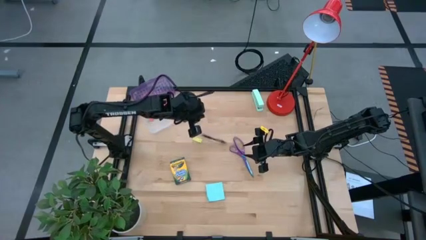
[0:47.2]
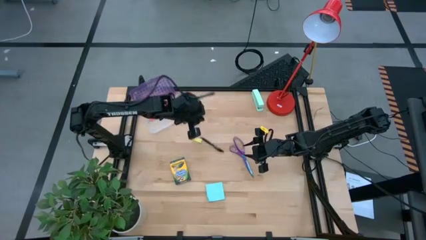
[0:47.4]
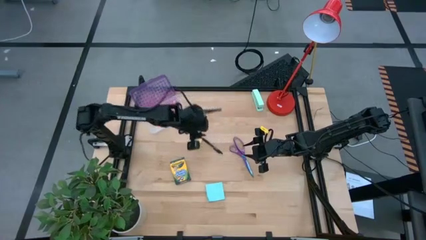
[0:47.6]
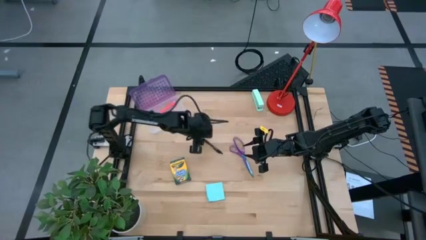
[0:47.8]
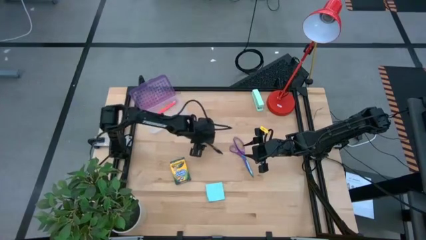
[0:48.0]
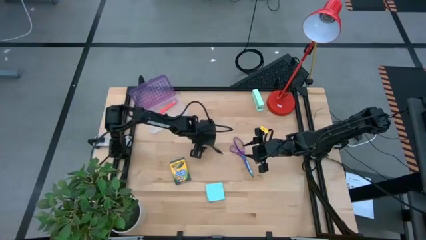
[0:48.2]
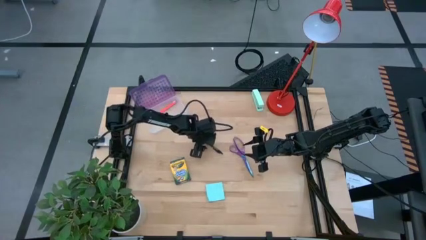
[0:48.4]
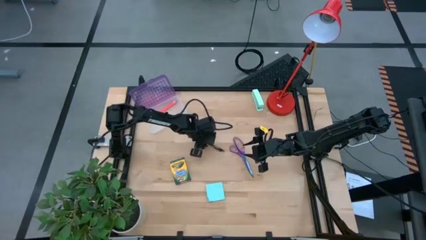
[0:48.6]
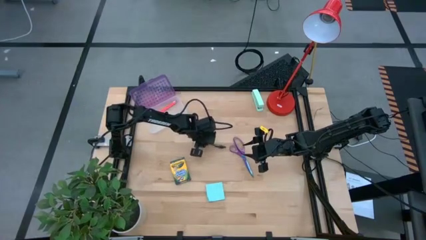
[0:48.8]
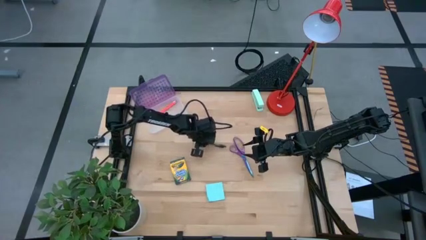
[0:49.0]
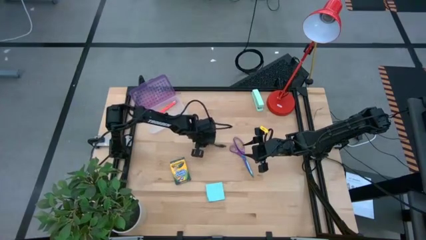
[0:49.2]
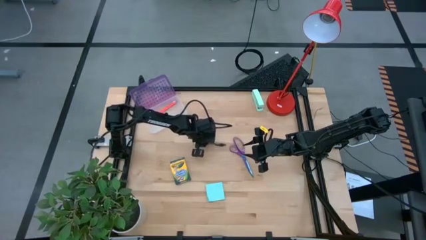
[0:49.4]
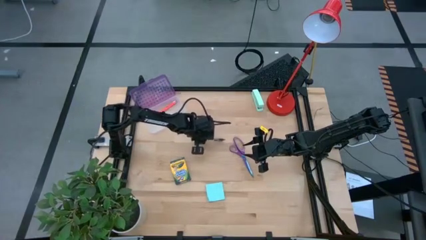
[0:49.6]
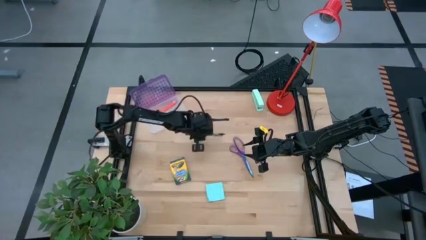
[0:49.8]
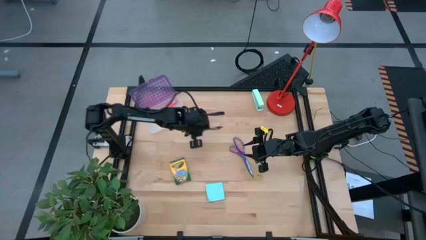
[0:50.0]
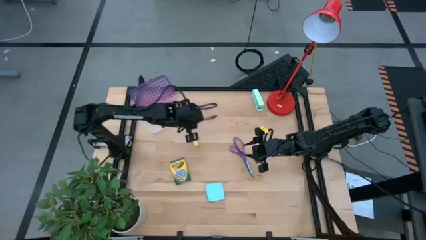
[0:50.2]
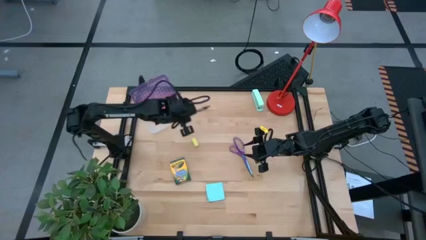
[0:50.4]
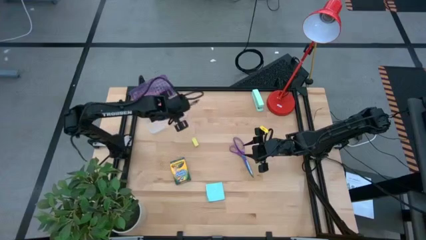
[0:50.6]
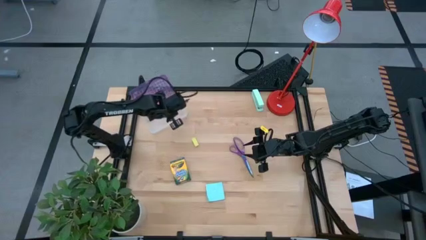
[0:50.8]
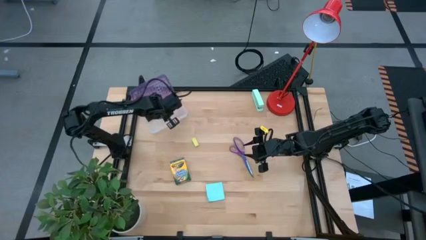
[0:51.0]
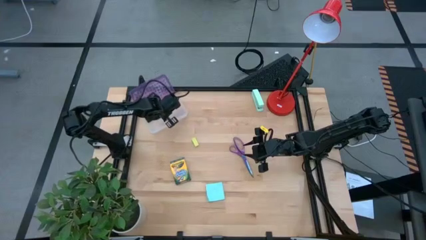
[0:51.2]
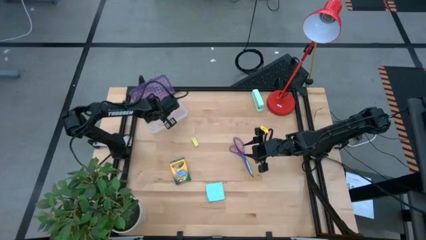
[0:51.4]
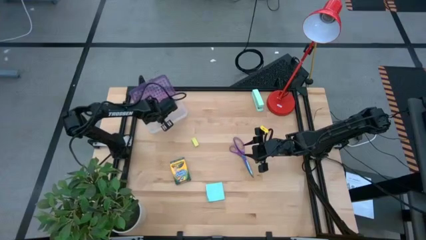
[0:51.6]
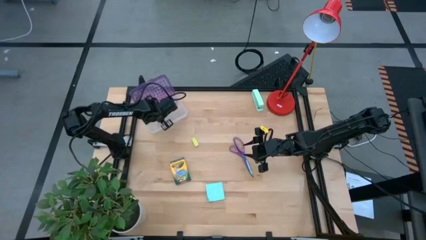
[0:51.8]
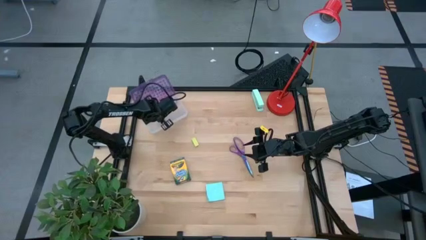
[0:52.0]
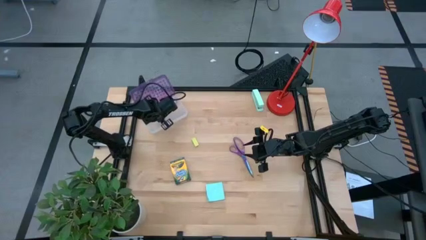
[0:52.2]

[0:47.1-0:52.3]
Task: Pack school essentials
Put the black pen into the purple supply box

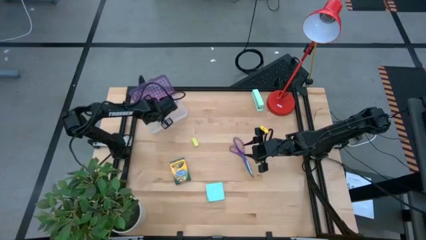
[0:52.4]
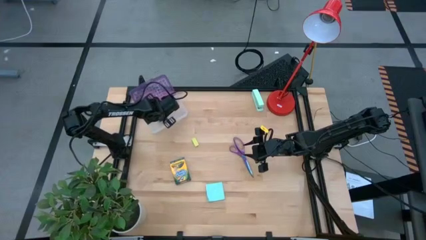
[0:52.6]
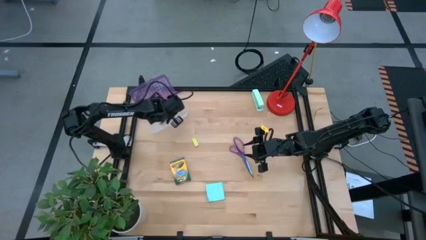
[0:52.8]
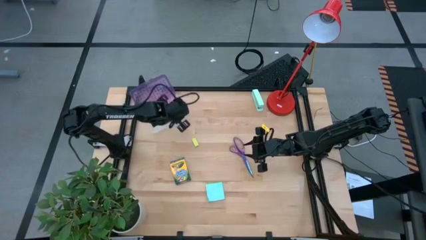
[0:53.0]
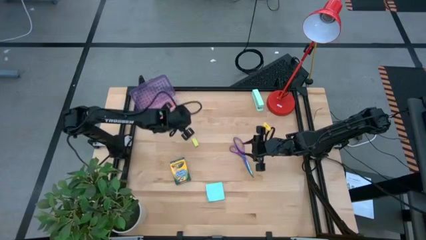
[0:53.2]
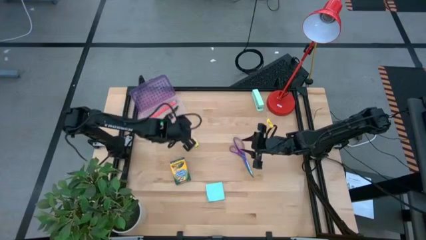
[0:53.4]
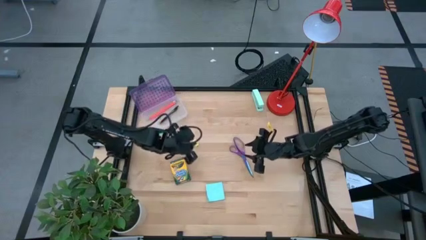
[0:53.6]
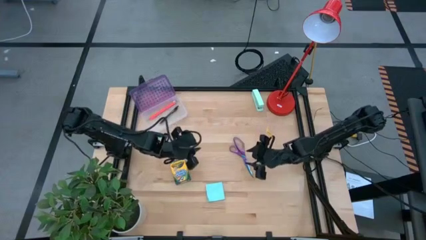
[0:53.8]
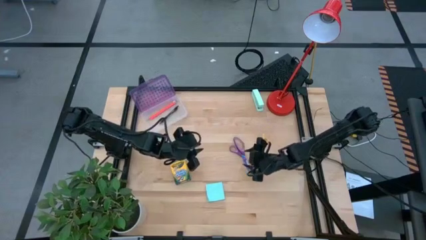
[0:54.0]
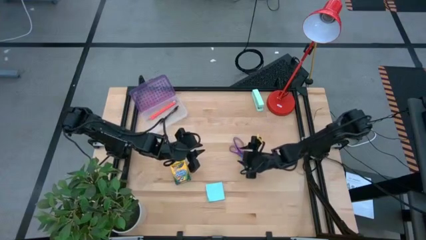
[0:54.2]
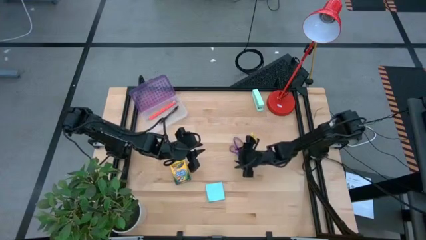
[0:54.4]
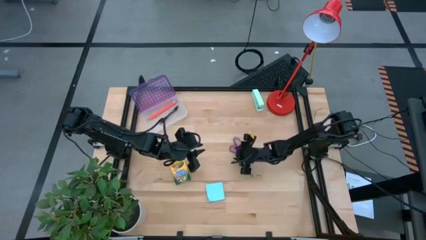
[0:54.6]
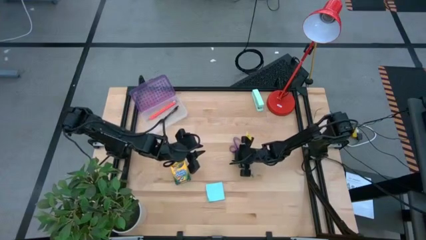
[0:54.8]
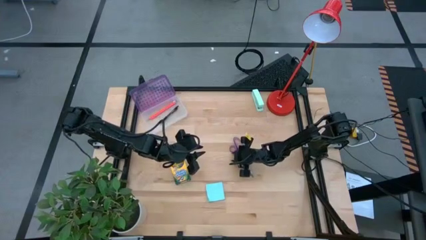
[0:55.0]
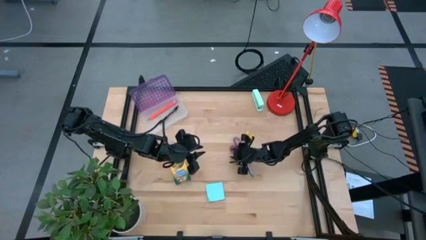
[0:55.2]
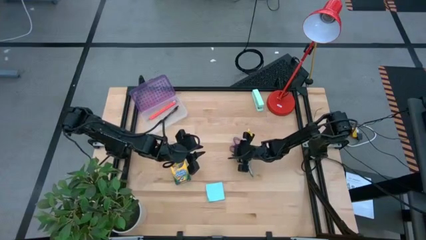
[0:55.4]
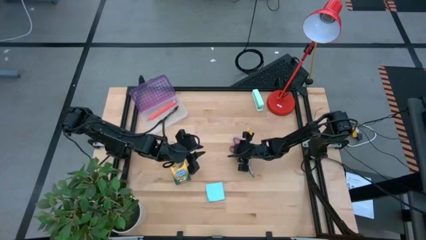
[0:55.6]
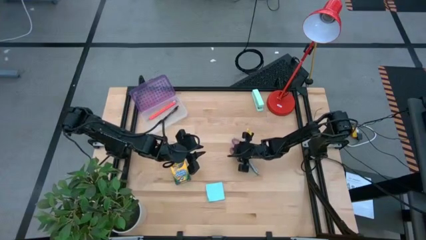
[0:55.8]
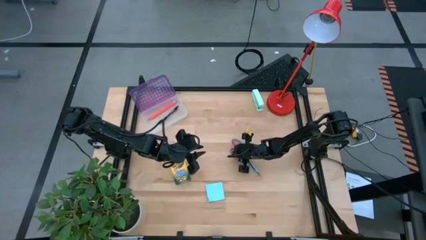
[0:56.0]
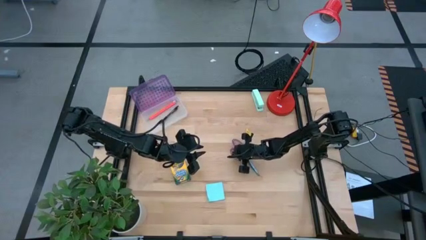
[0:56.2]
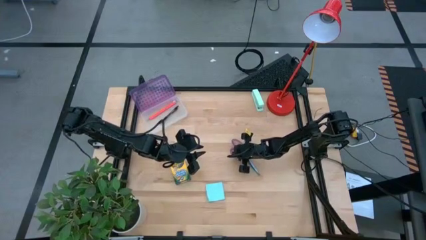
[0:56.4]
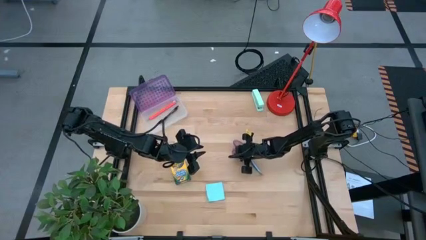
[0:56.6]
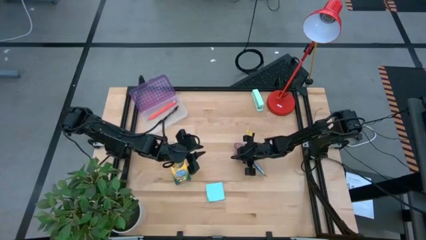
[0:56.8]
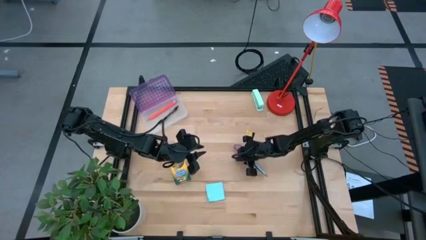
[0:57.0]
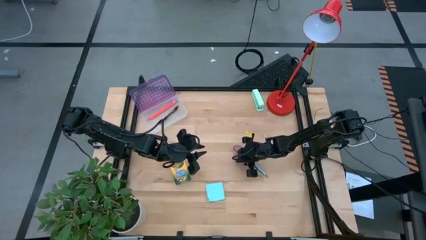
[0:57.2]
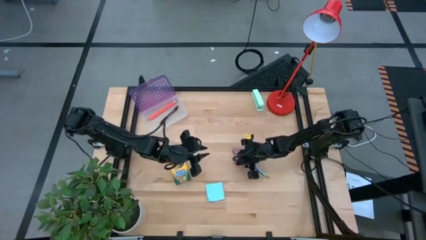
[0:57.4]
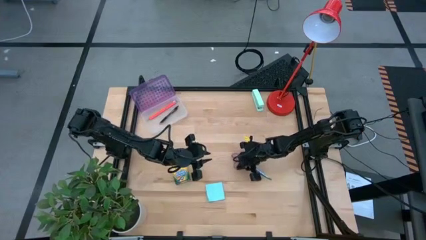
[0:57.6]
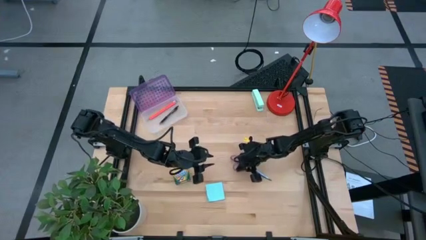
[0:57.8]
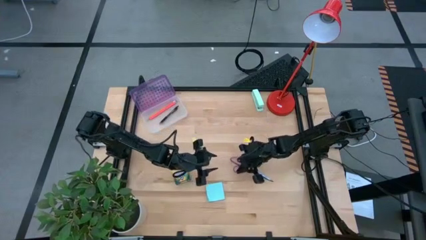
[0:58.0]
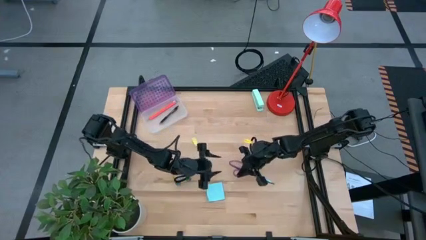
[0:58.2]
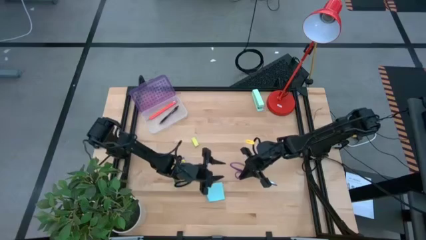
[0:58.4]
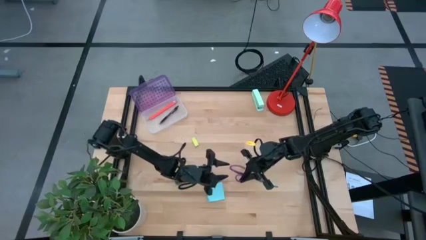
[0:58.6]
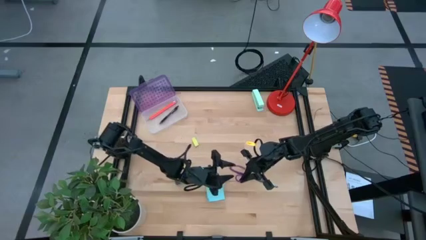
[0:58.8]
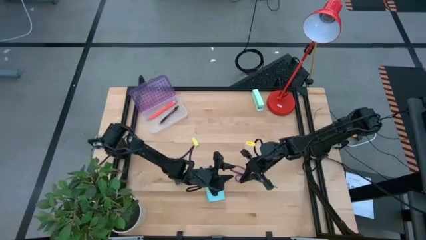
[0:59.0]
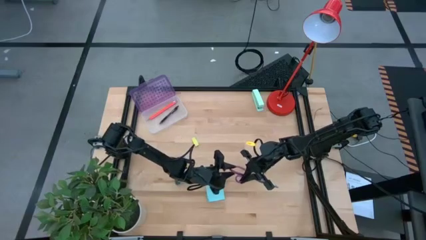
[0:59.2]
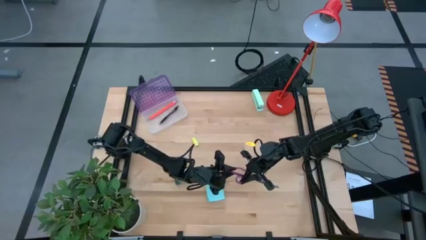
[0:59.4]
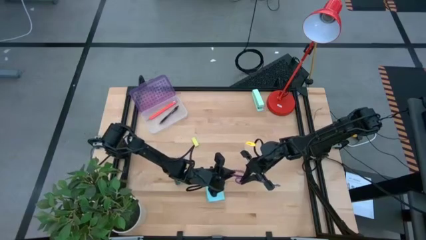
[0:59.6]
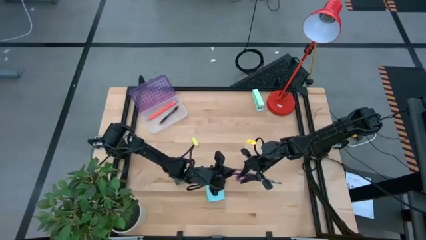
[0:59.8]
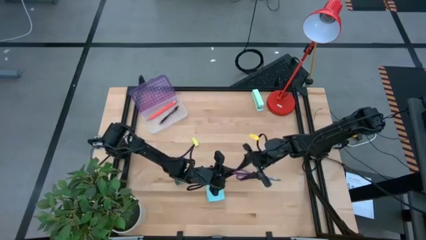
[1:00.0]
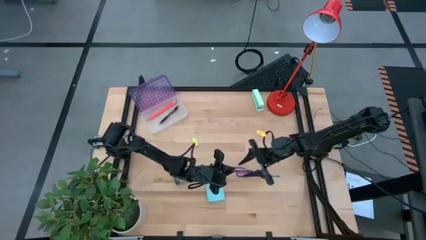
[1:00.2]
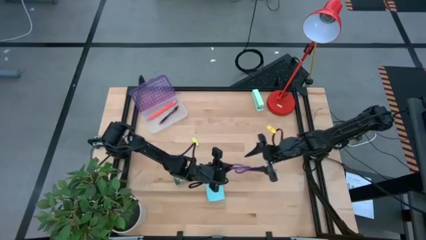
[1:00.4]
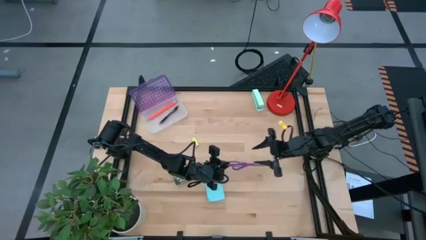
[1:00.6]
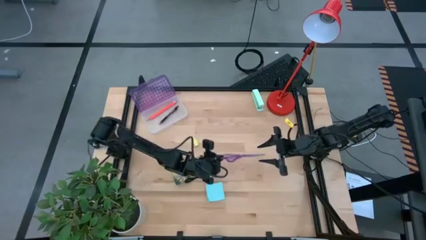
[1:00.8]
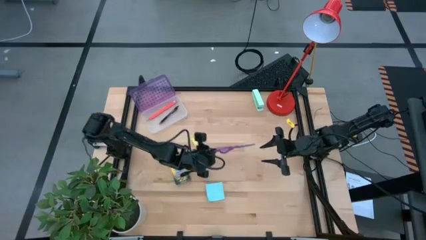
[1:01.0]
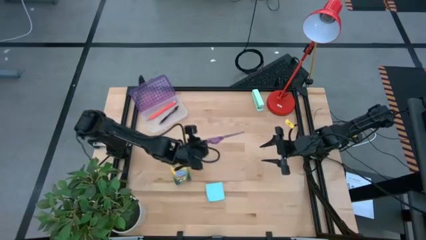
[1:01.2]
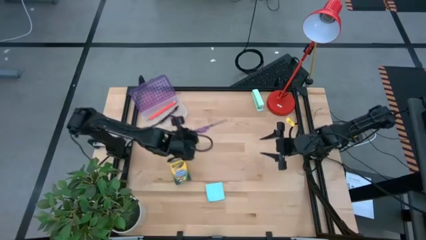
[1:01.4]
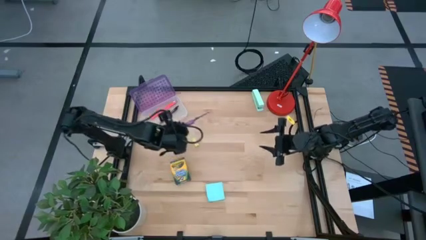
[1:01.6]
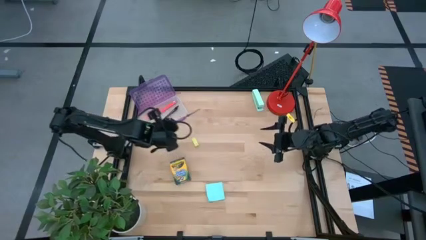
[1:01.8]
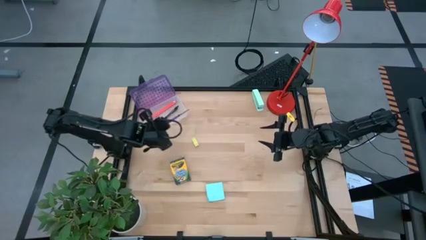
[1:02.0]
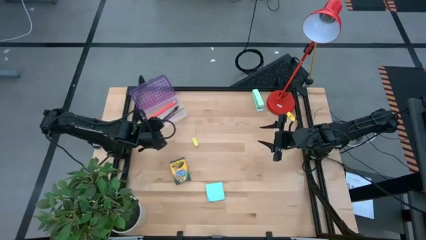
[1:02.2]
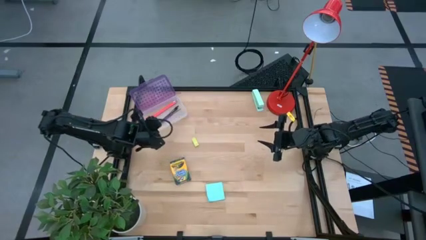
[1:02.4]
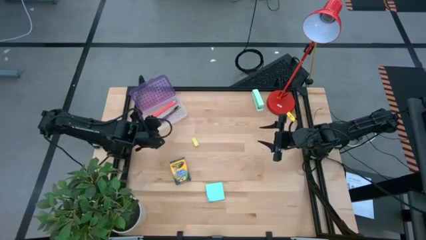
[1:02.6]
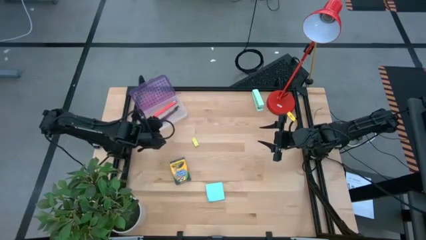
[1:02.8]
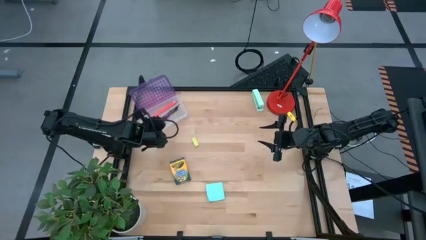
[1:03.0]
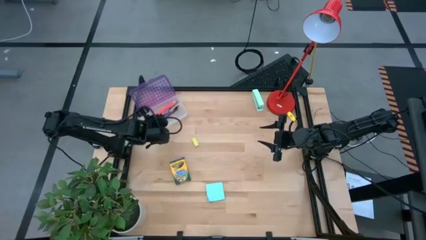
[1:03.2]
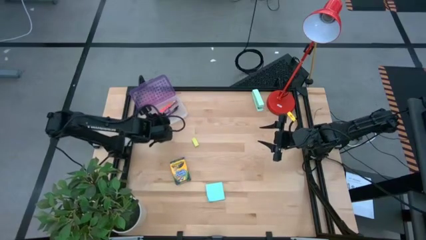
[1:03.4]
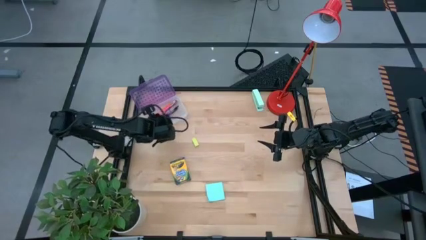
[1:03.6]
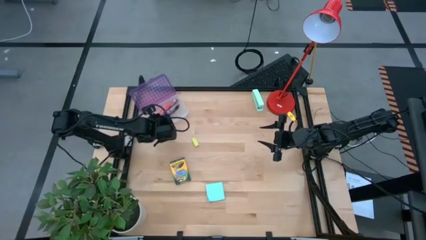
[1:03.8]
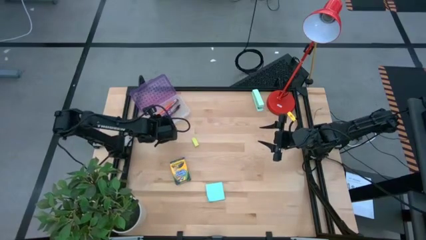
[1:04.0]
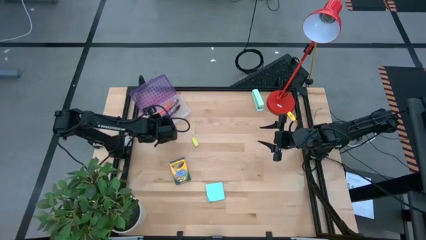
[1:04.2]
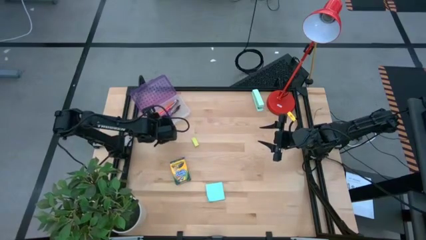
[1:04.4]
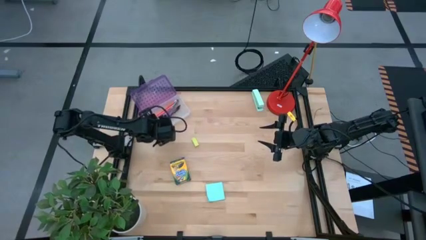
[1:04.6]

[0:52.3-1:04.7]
Put the purple scissors into the purple supply box
